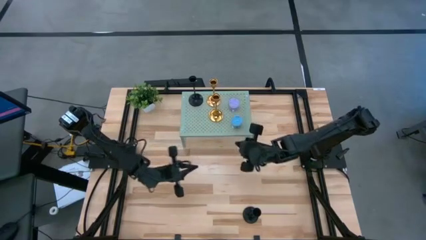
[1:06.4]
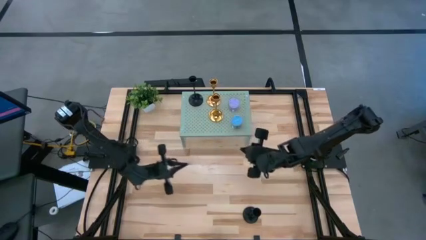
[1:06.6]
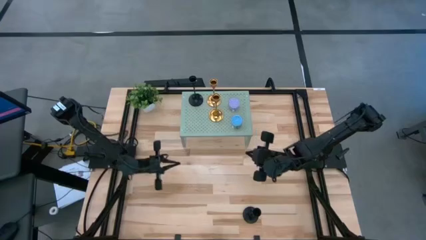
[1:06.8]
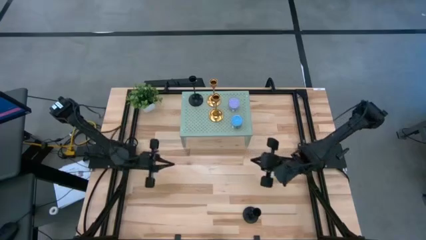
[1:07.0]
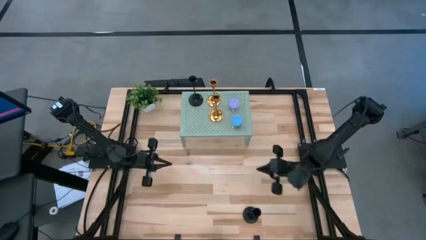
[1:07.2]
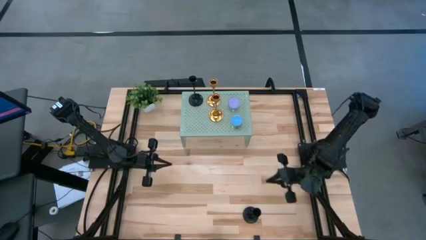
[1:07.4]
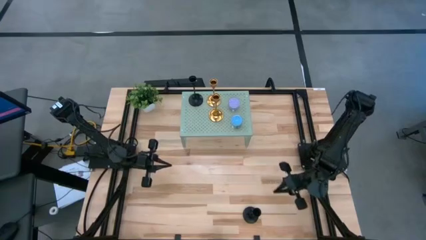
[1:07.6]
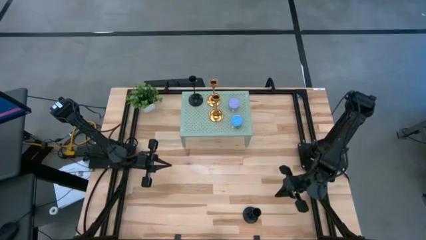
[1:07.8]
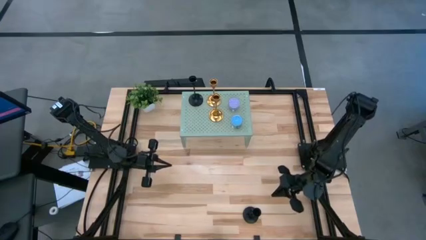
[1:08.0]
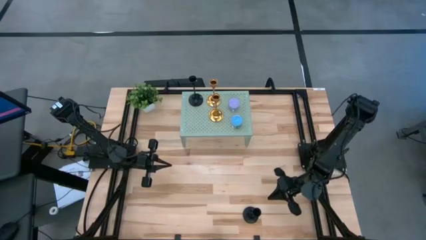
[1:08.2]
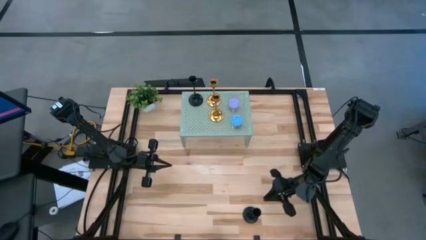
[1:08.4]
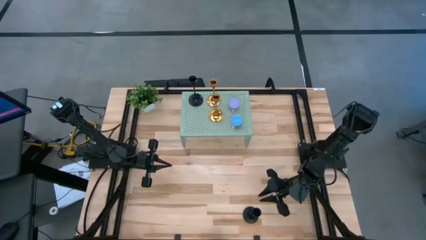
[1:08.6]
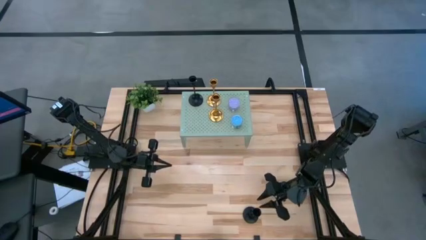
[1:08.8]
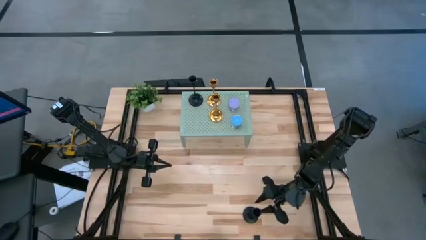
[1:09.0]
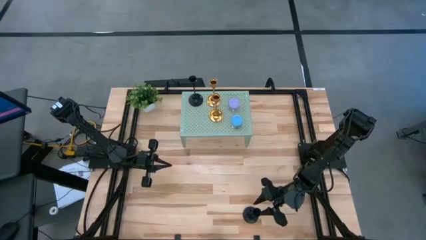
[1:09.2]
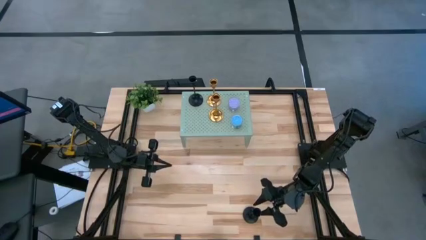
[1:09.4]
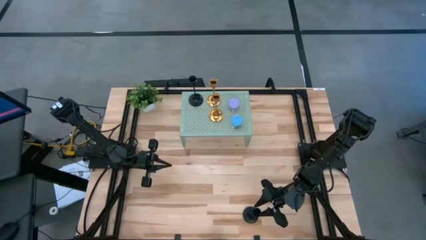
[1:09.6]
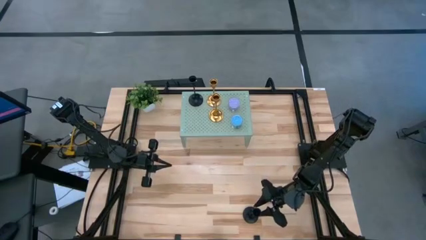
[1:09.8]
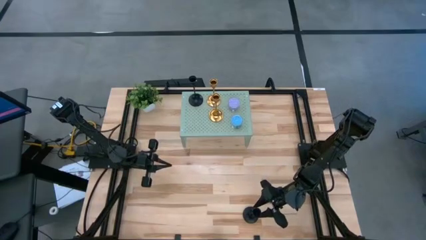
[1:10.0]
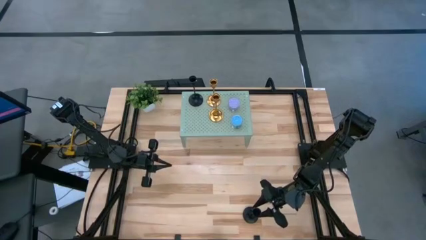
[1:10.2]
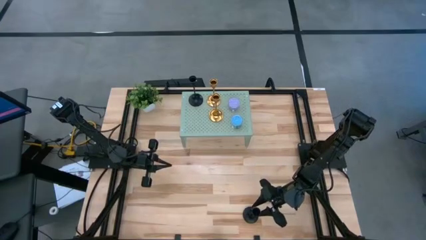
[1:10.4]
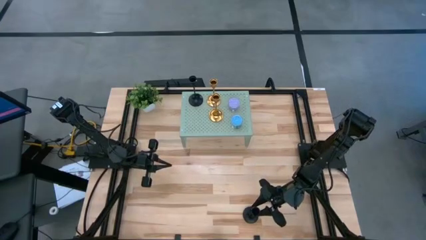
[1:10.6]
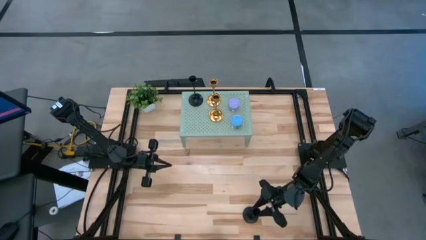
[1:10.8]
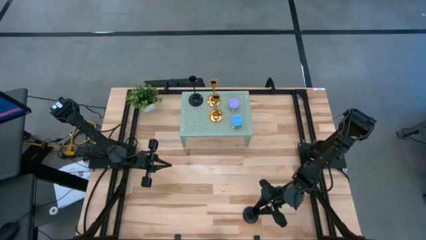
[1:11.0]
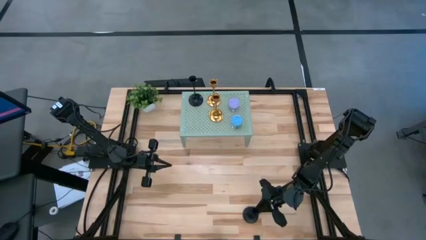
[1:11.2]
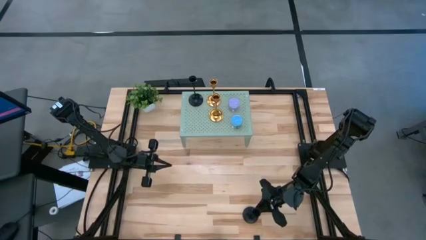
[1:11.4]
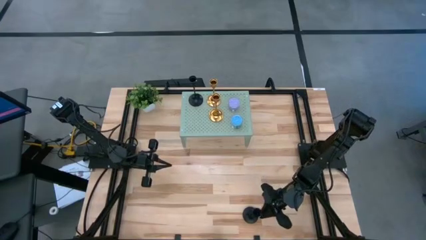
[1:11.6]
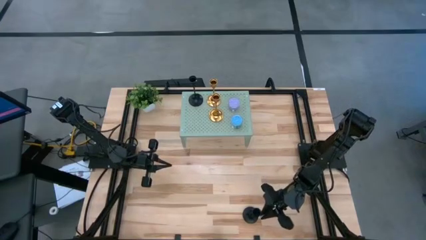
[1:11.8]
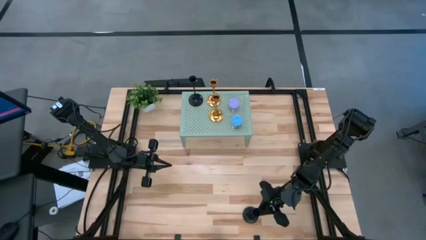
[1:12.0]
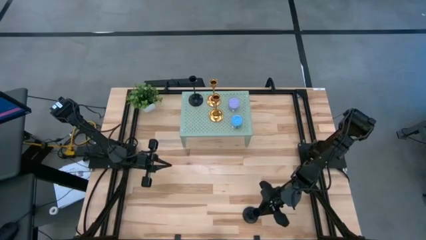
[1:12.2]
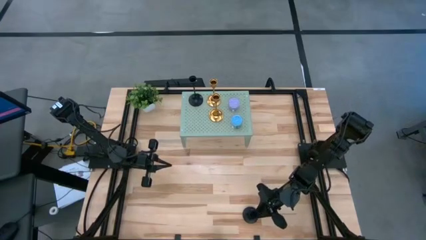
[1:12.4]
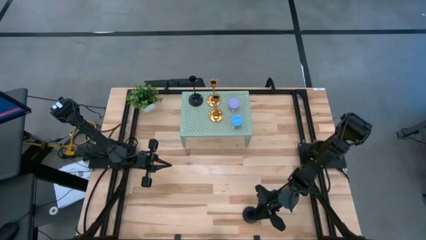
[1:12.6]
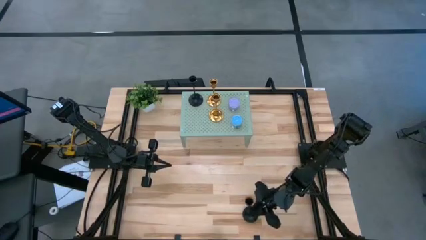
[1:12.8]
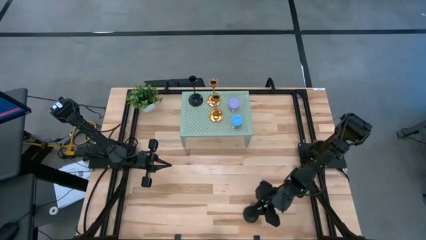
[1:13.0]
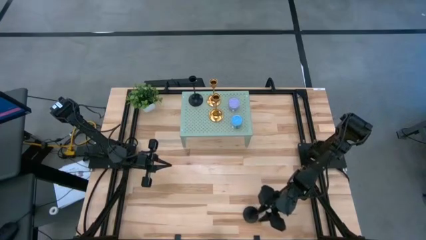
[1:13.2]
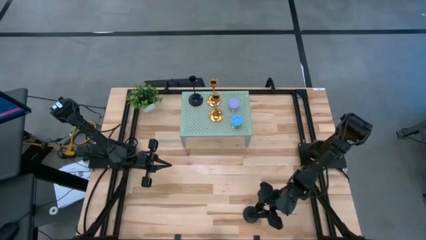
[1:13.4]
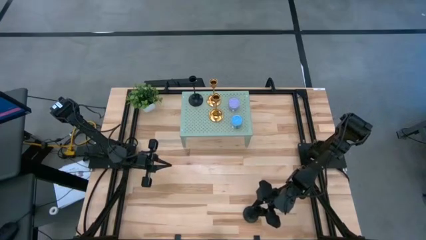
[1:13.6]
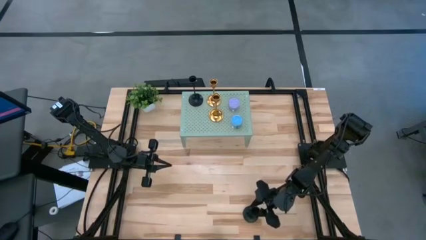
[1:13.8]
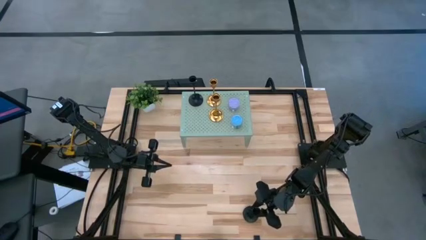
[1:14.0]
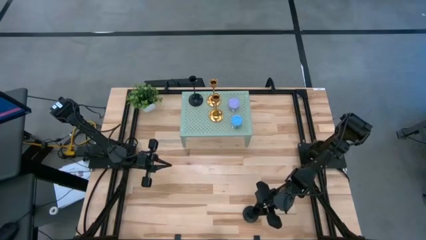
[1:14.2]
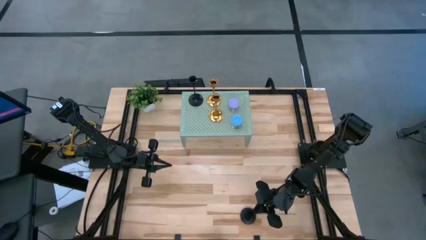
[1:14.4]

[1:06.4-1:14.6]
Task: Pick & Place candle stick holders
Put the black candle holder on the shelf aligned with the other black candle holder

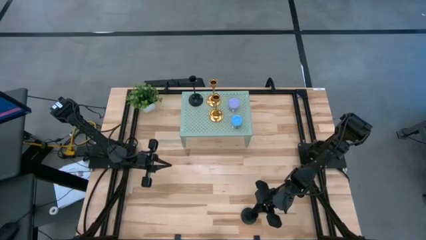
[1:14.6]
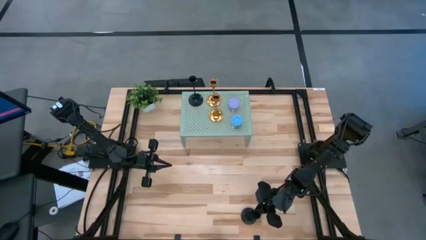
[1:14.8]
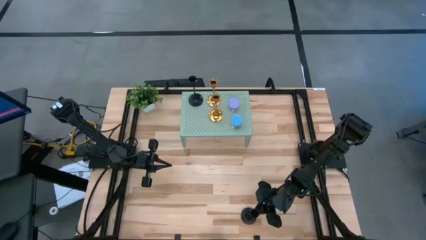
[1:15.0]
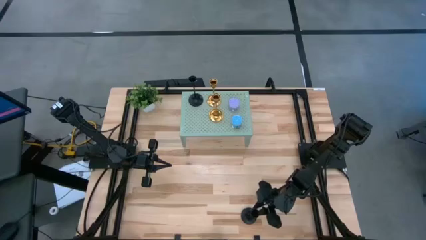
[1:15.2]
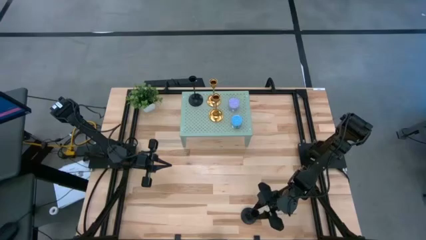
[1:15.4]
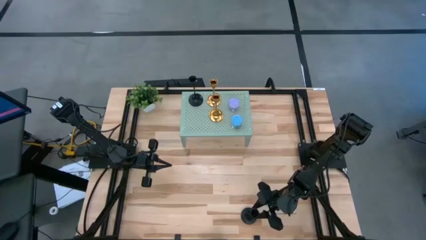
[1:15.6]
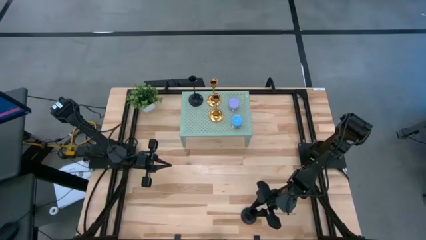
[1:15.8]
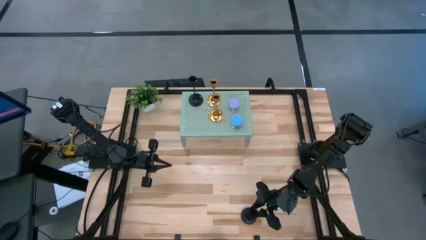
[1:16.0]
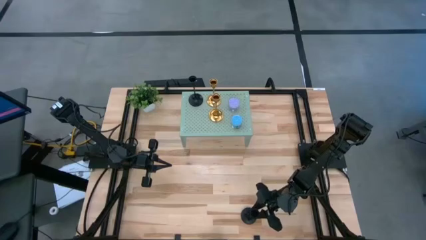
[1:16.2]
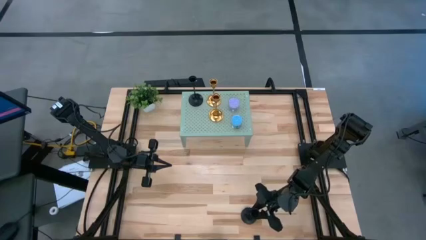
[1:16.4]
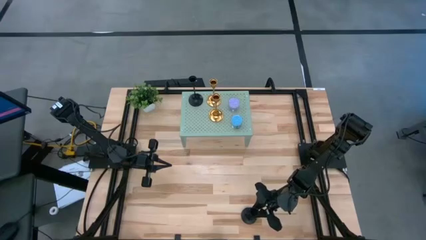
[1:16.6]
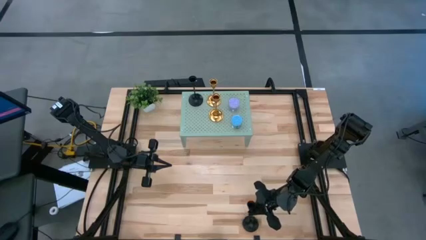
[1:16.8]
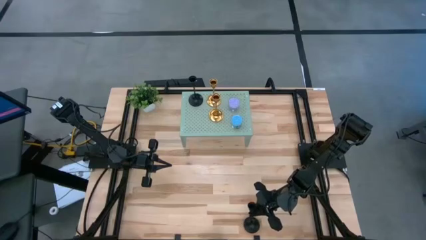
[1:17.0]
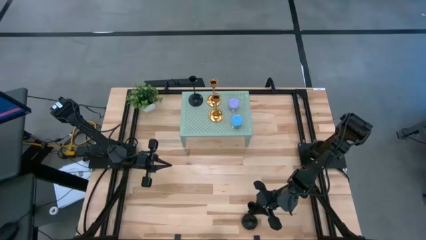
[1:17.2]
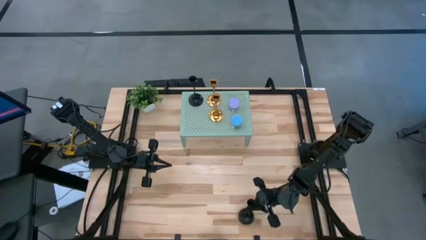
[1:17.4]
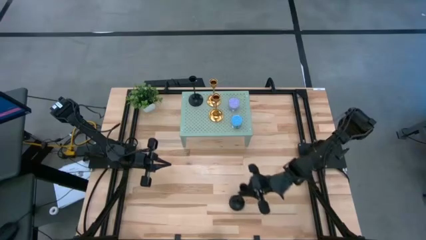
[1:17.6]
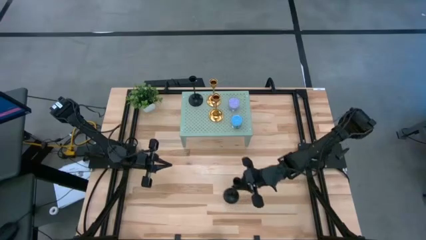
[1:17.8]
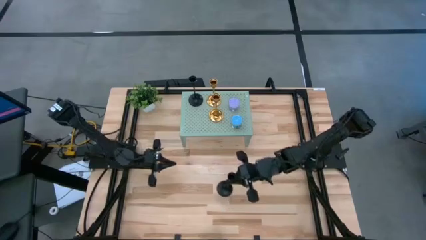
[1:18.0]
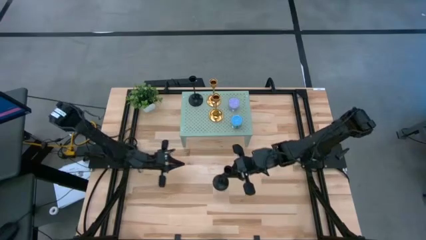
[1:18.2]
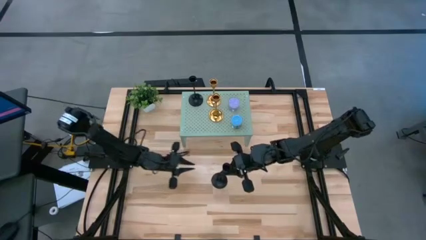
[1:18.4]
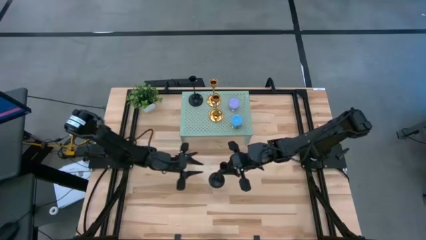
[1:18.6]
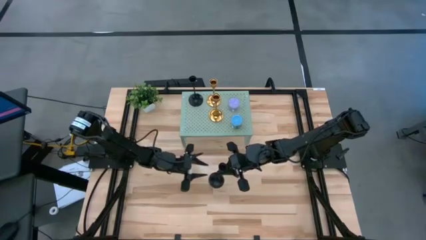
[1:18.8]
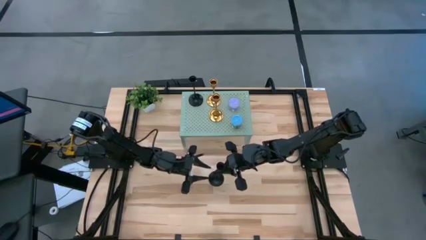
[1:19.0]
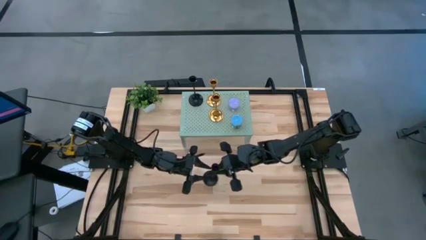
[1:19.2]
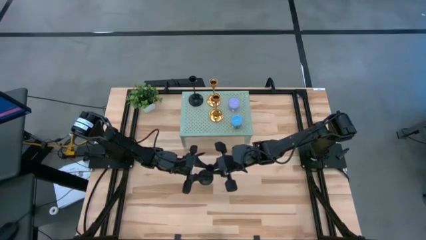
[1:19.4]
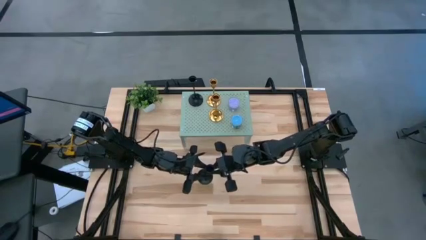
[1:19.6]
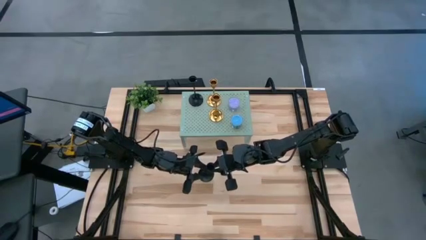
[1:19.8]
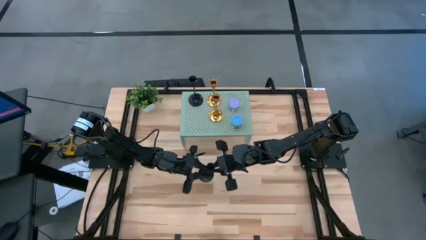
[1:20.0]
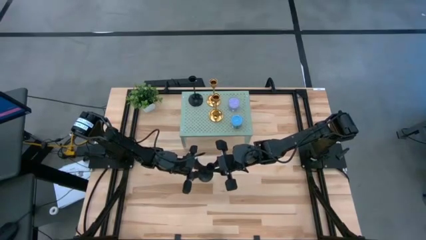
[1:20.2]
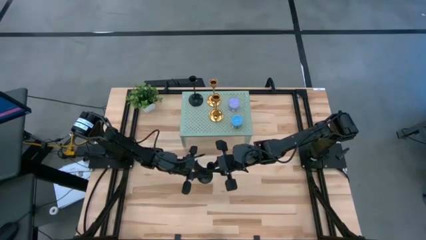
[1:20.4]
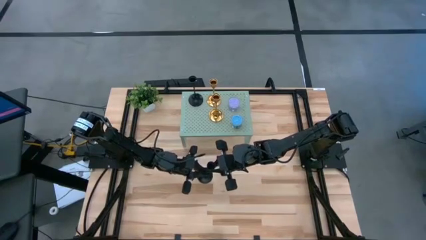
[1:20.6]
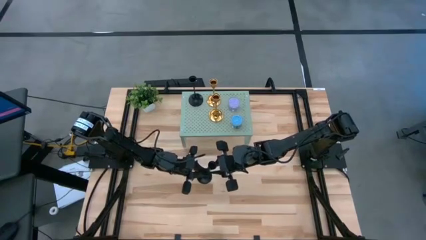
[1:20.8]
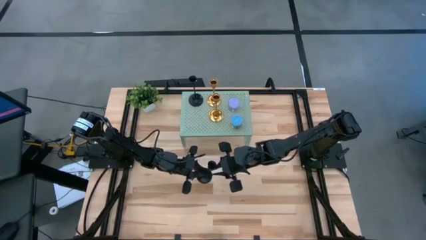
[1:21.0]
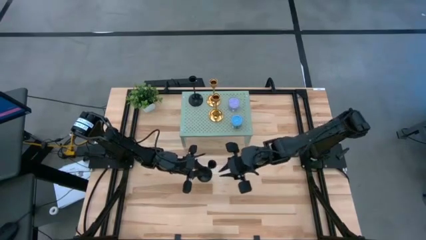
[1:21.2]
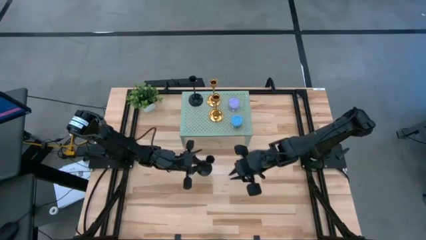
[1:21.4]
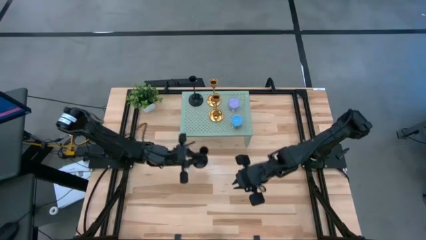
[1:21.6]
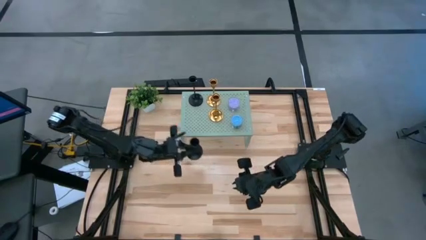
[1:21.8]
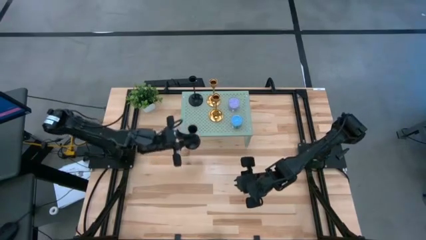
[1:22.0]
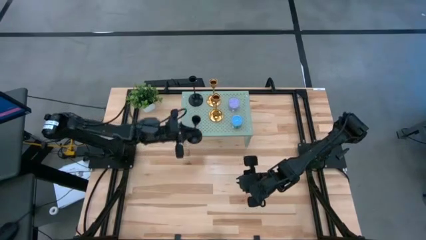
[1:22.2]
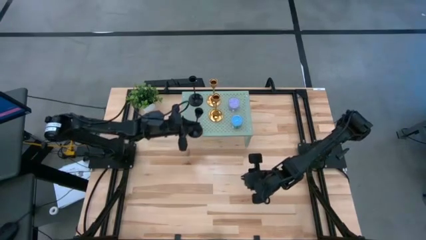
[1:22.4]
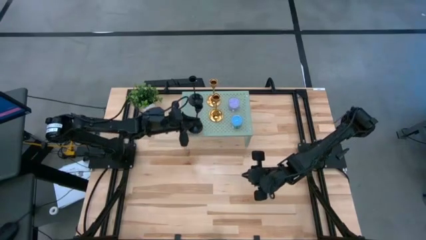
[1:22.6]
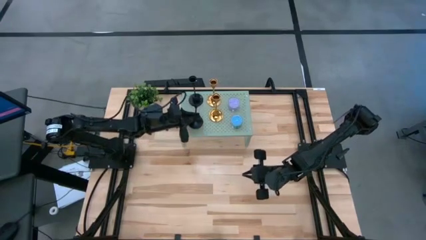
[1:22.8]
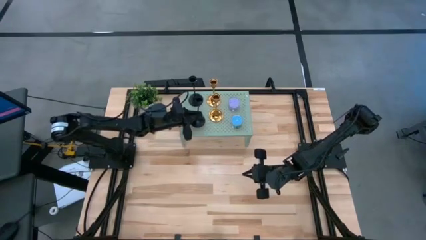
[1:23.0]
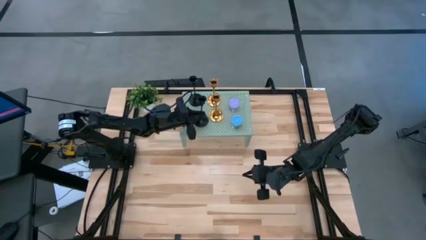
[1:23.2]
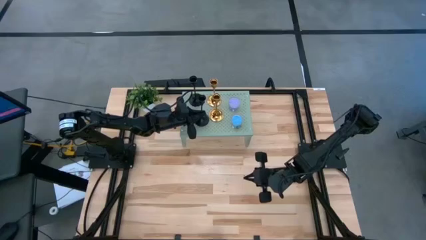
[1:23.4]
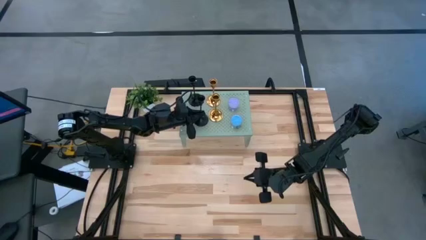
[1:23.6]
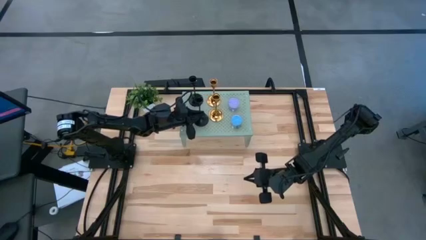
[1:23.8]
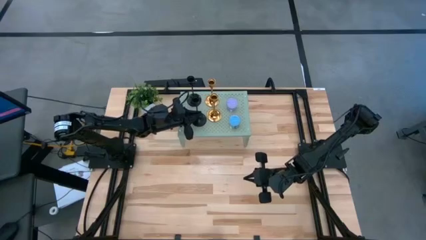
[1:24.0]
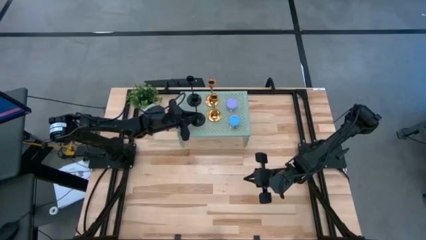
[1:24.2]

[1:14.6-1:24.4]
Put the black candle holder on the shelf aligned with the other black candle holder
